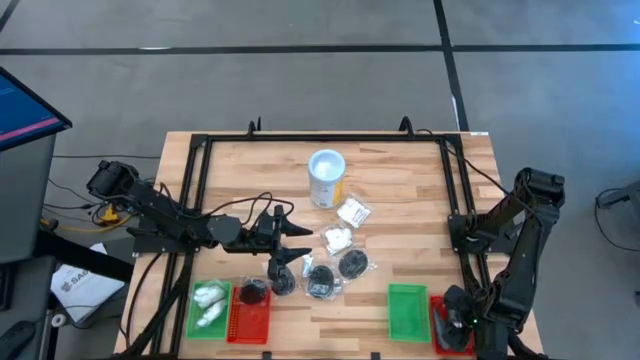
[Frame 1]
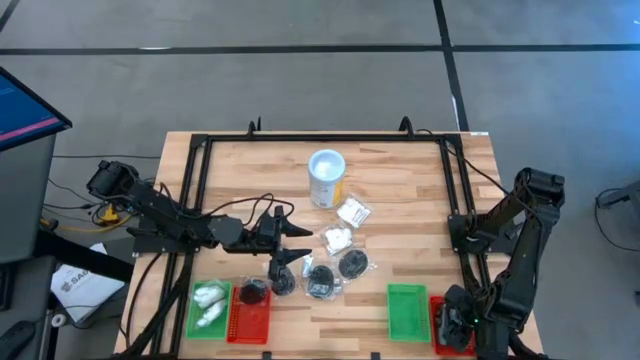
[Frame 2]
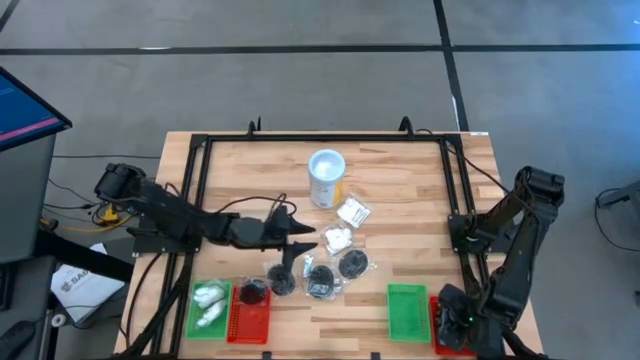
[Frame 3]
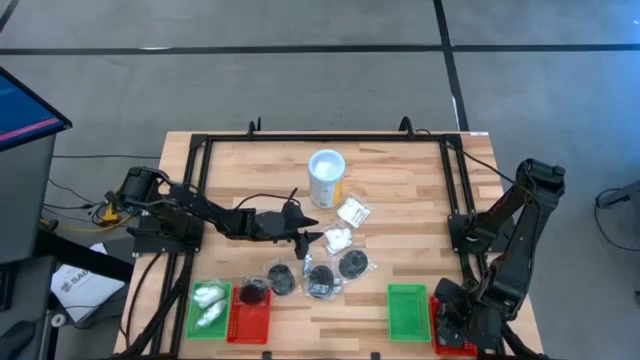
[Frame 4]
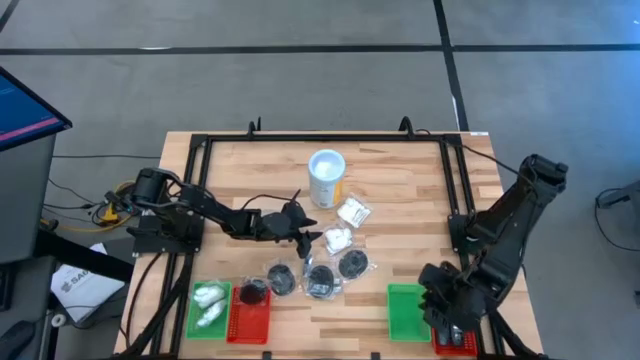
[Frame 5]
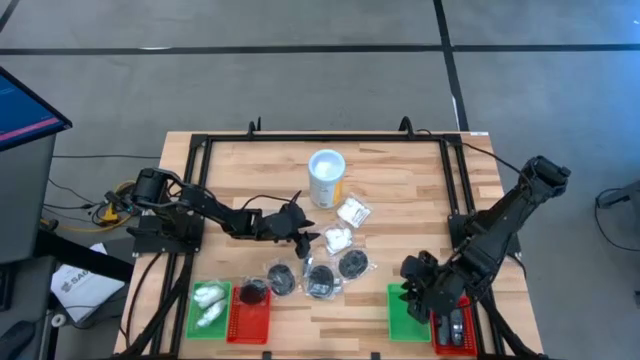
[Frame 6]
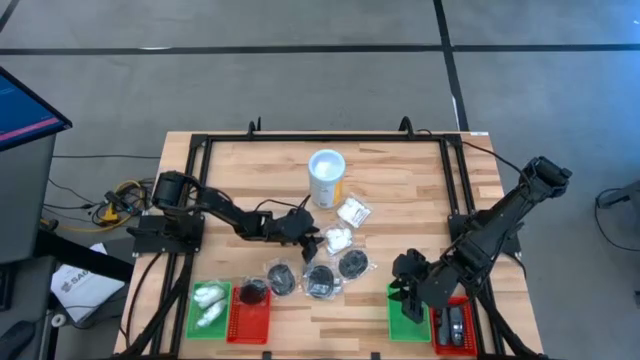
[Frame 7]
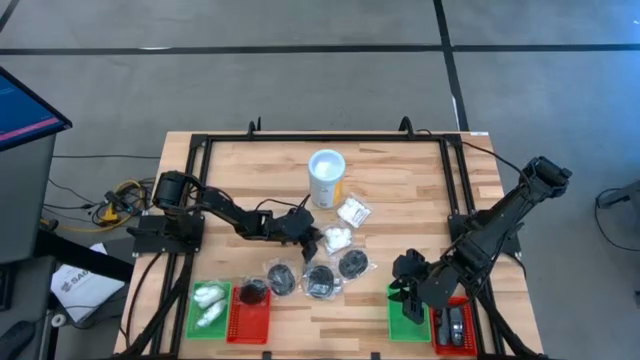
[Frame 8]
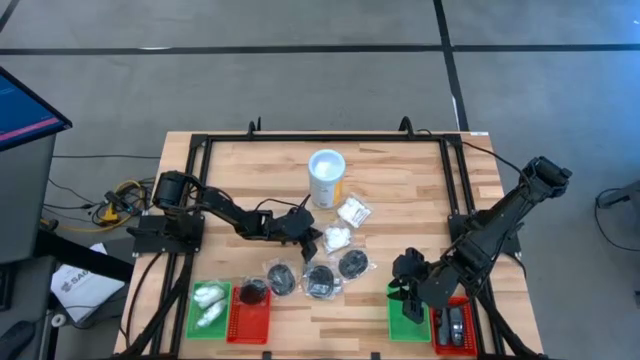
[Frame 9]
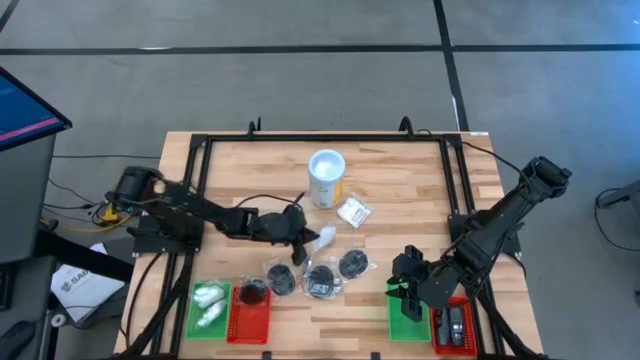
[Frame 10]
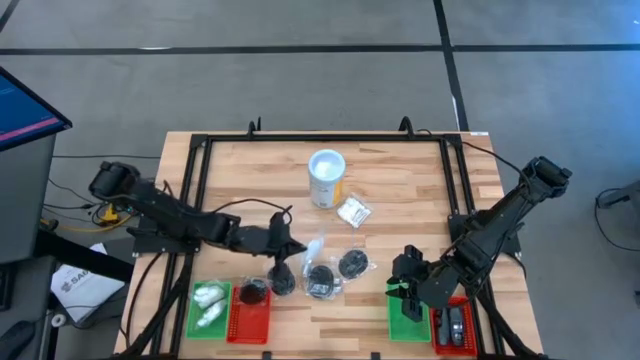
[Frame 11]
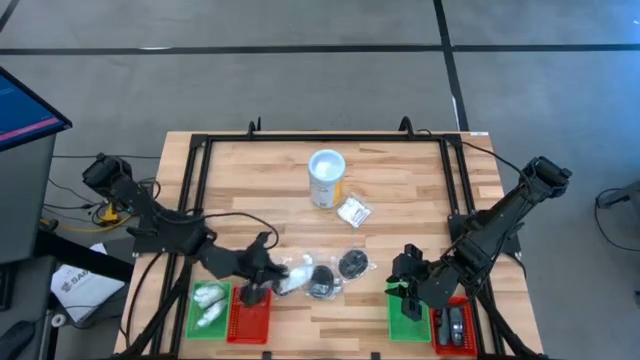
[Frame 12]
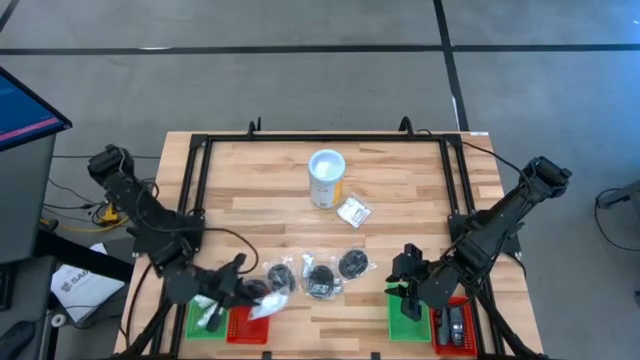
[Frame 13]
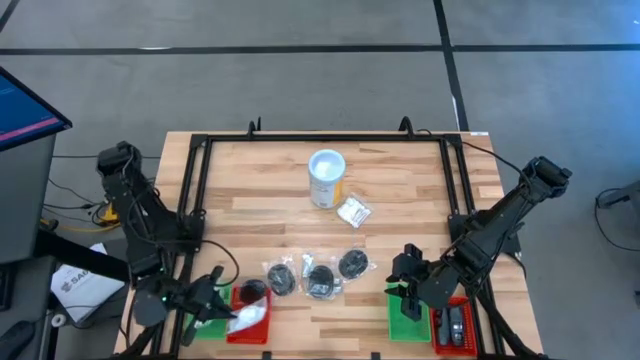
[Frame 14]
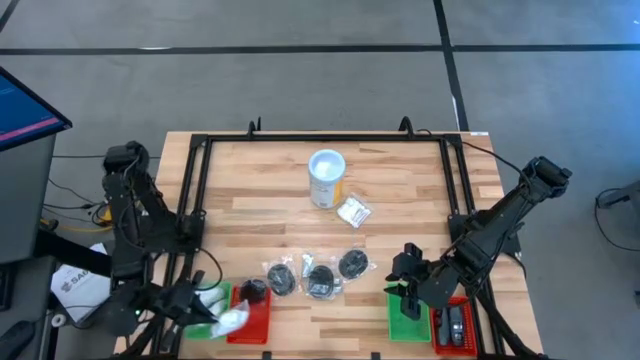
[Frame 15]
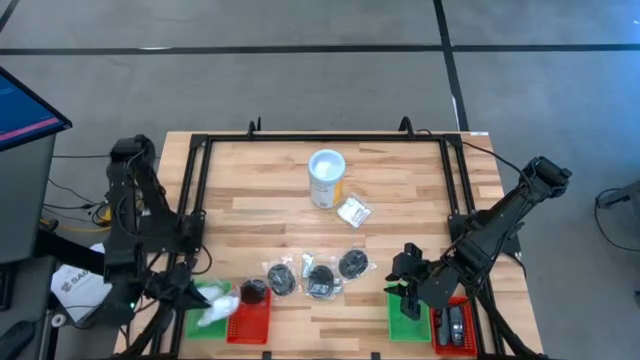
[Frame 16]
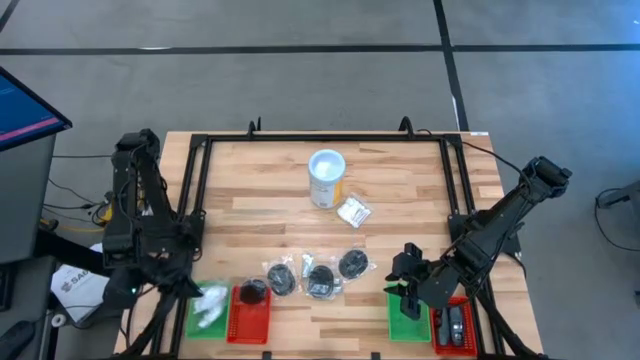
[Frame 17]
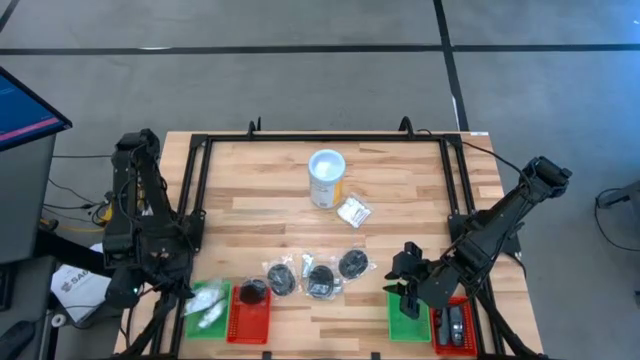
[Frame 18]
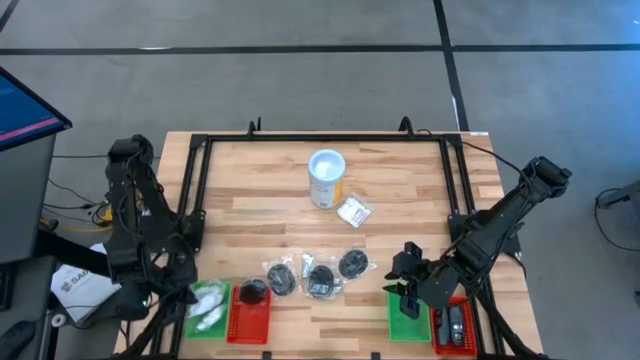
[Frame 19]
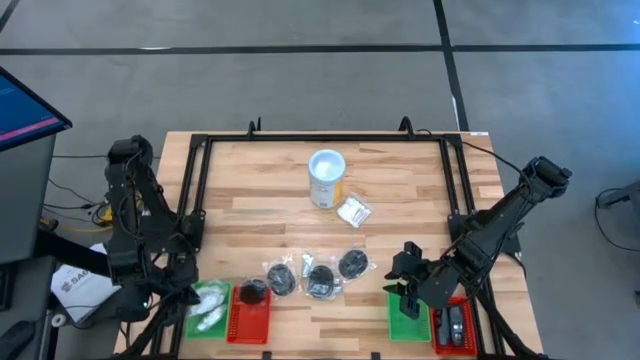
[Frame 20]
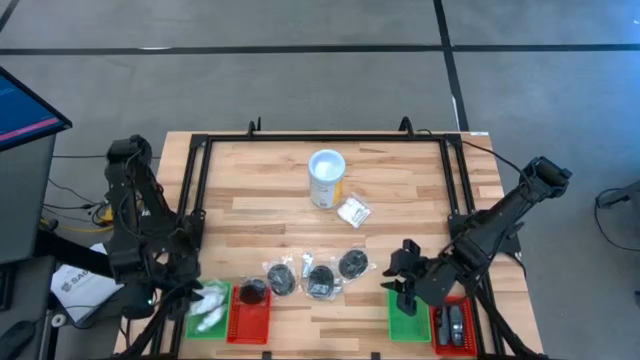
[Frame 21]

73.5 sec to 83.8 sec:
Task: Pick & Place Travel size toiletries
Put the cotton pack into the left green bin

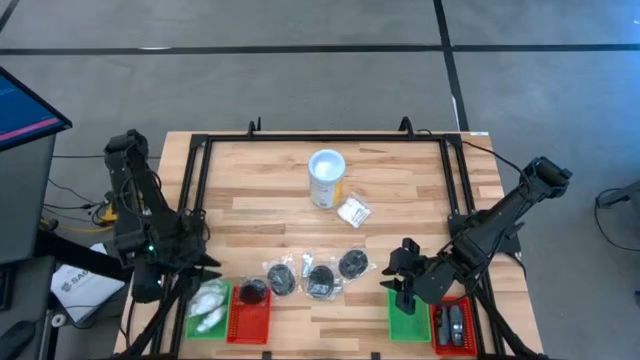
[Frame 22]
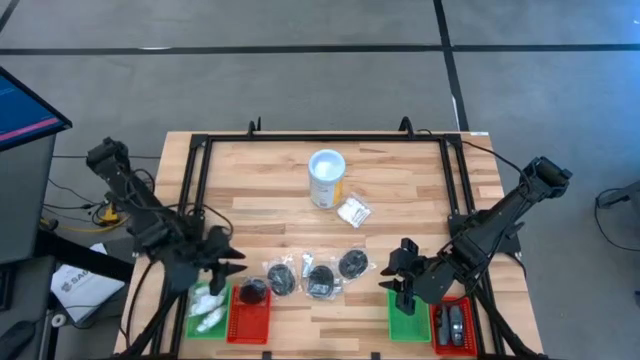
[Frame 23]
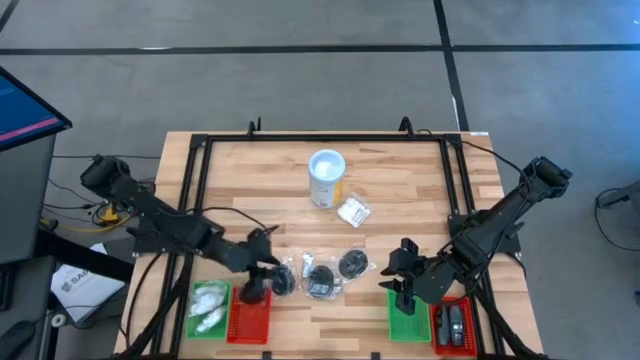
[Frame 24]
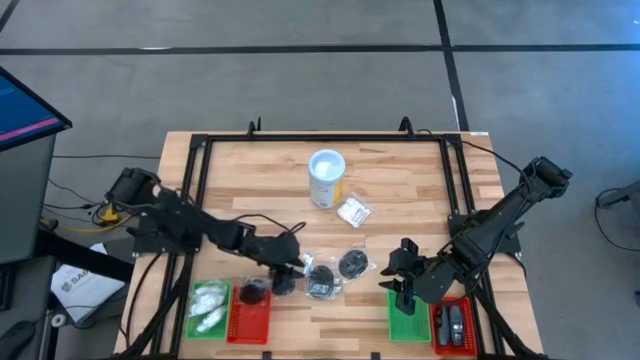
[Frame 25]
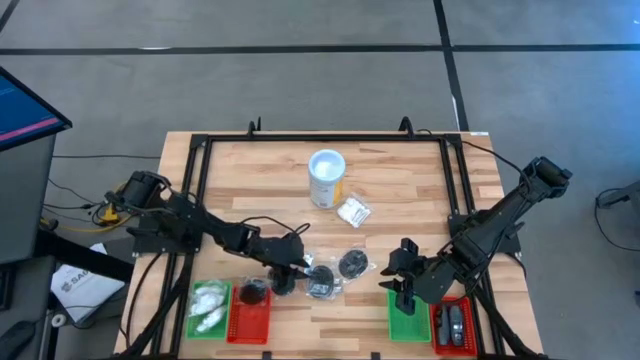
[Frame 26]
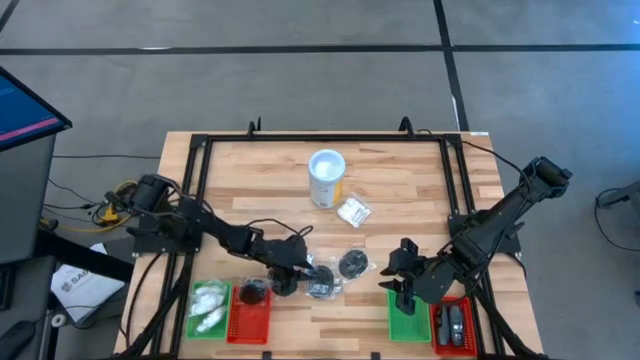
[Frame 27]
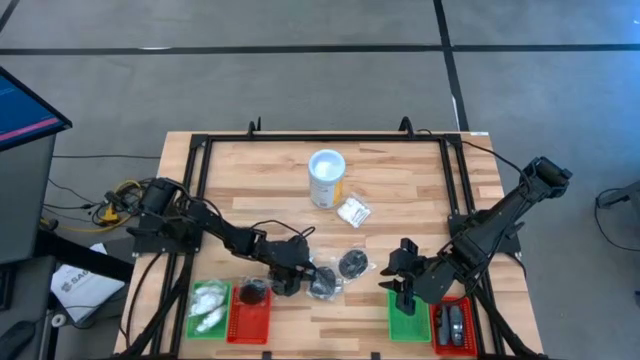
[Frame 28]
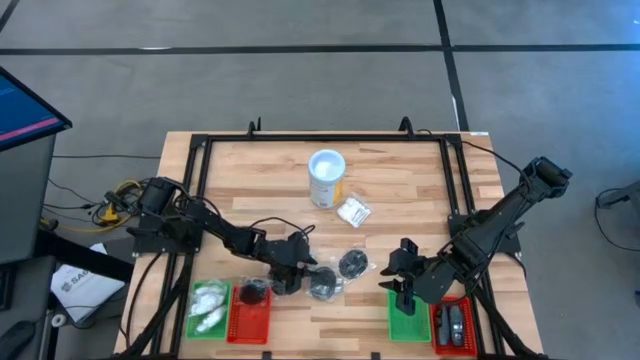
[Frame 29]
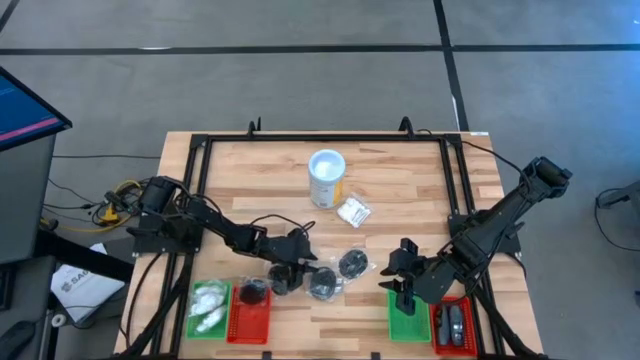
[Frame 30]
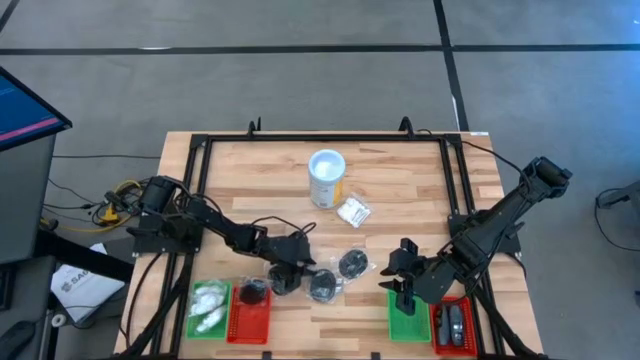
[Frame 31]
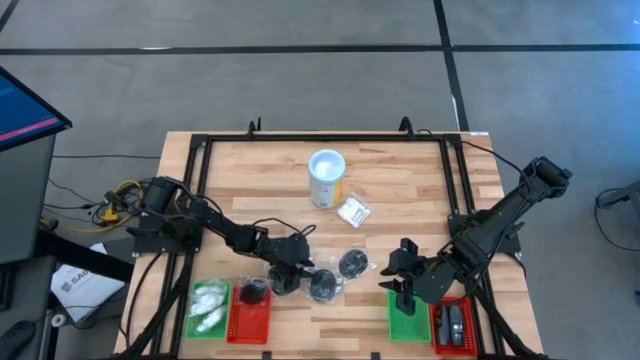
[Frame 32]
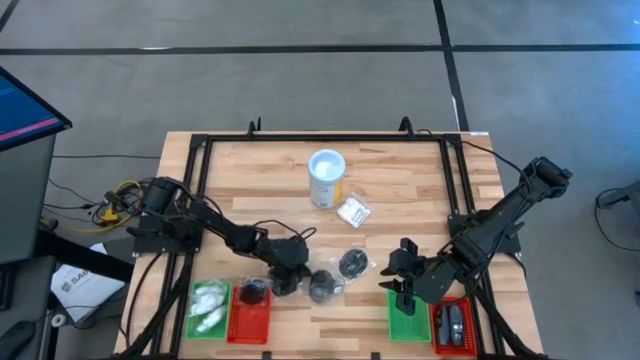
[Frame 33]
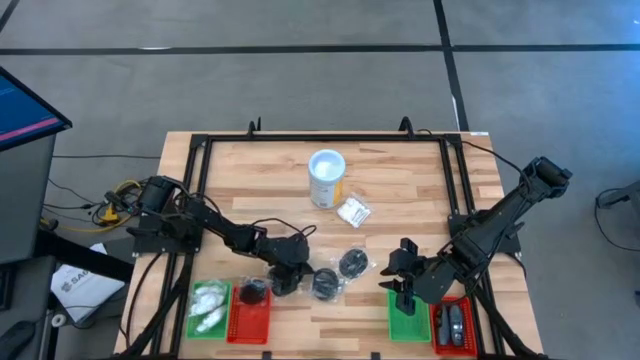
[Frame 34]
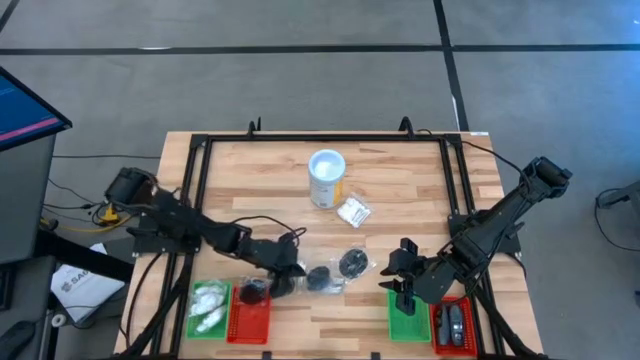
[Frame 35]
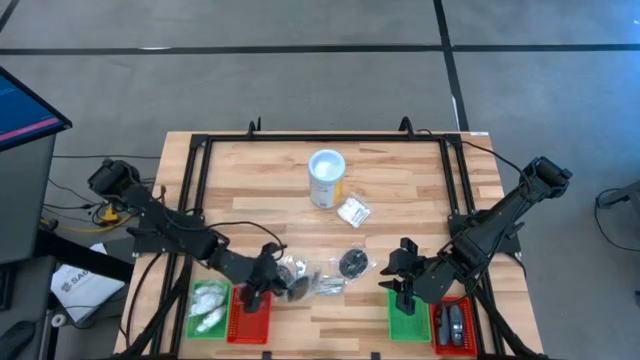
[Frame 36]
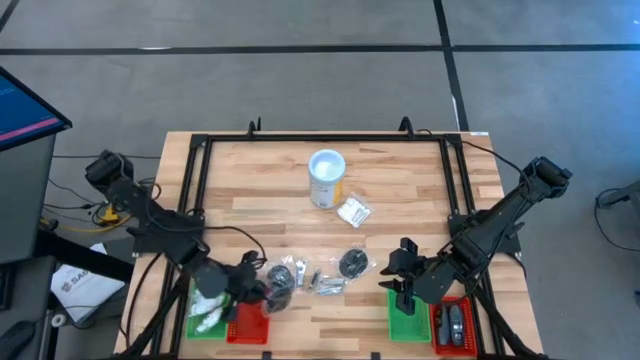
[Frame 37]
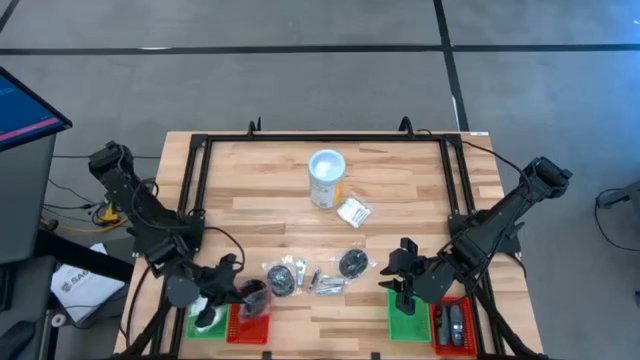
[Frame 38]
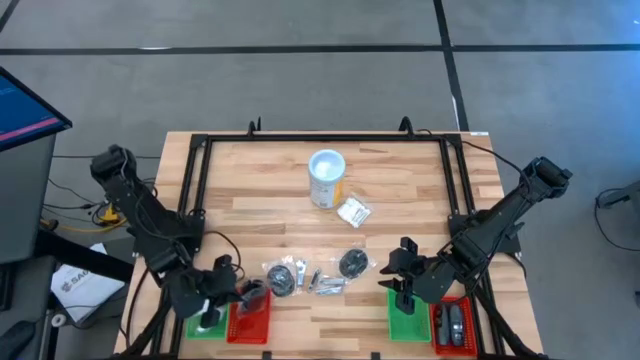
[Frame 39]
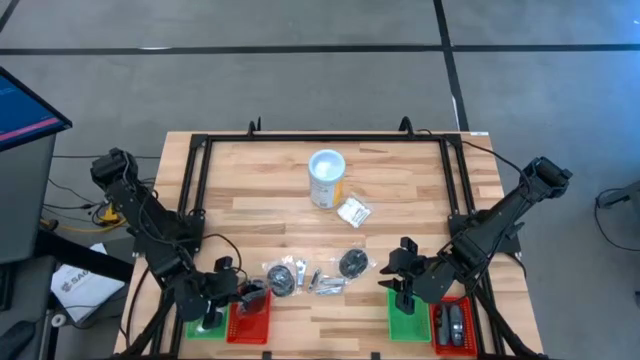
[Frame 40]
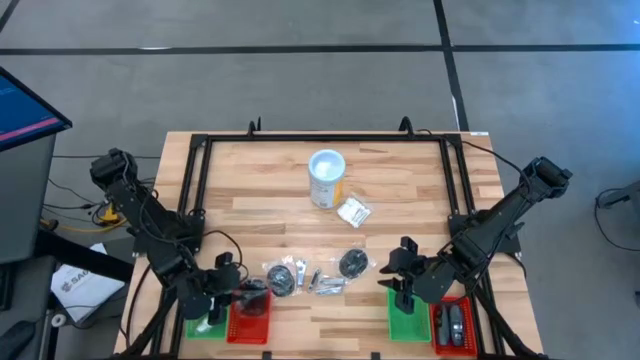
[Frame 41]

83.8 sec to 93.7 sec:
Put the hairbrush into the left red bin
